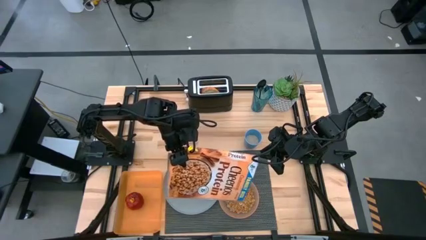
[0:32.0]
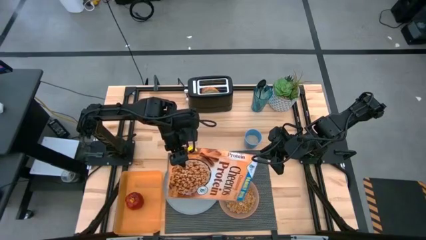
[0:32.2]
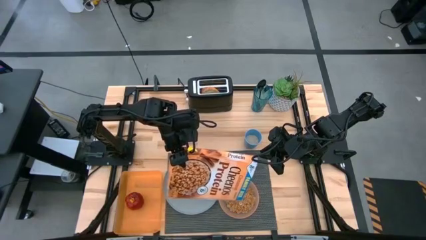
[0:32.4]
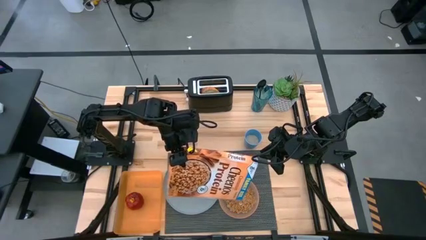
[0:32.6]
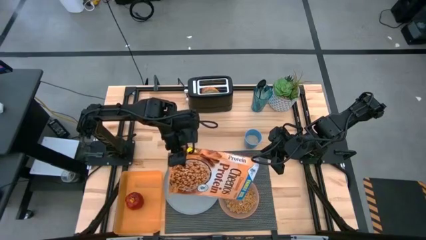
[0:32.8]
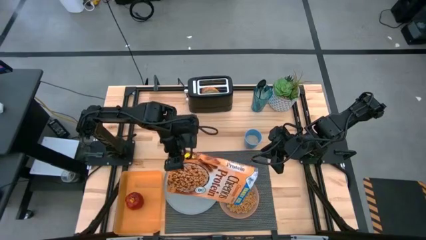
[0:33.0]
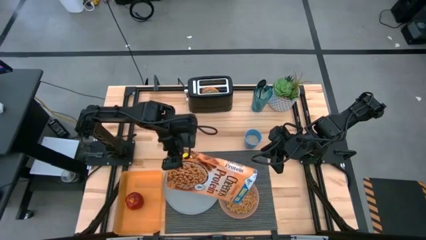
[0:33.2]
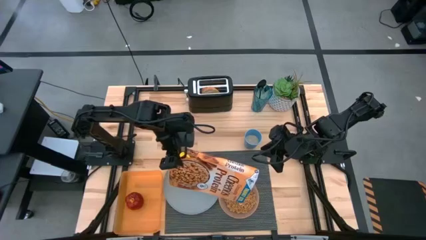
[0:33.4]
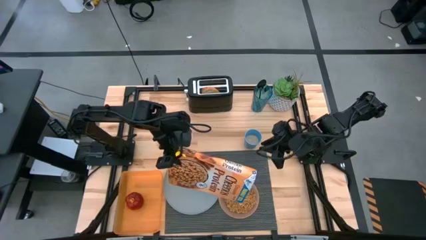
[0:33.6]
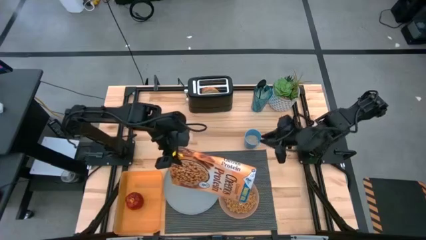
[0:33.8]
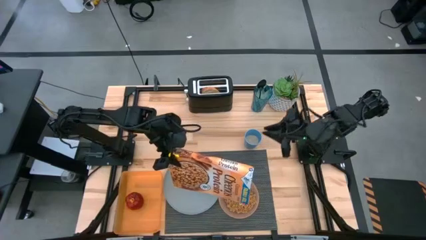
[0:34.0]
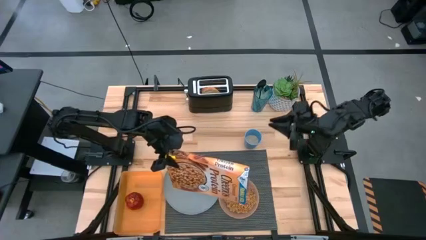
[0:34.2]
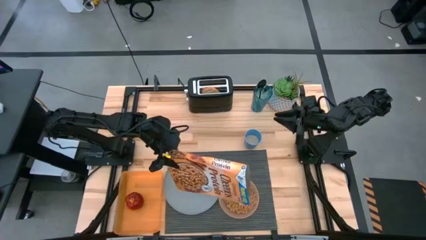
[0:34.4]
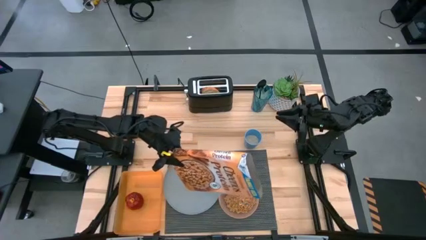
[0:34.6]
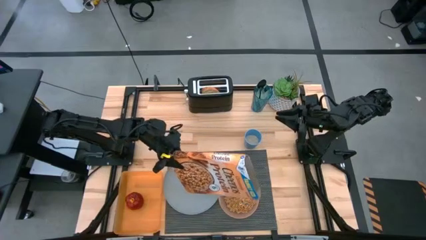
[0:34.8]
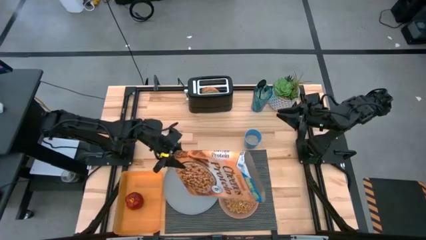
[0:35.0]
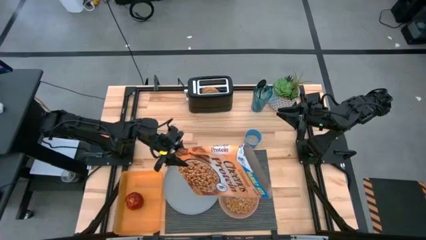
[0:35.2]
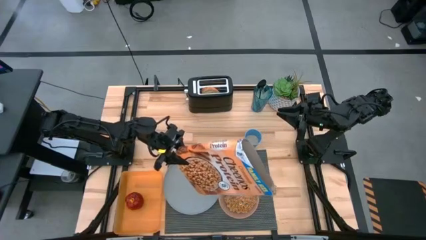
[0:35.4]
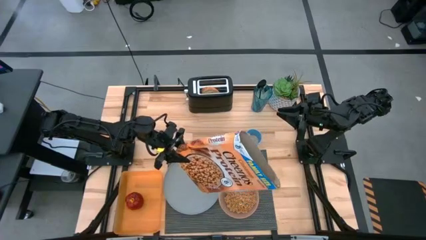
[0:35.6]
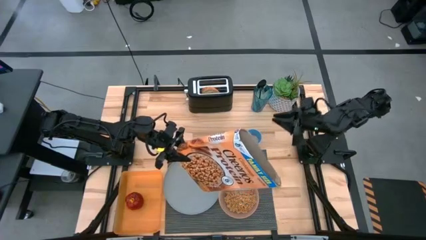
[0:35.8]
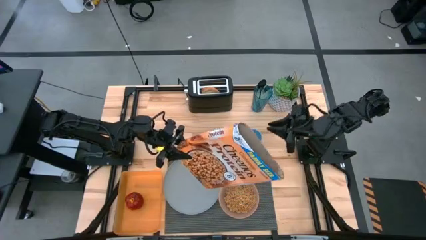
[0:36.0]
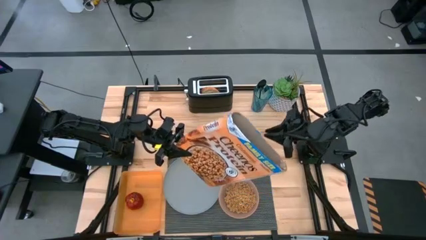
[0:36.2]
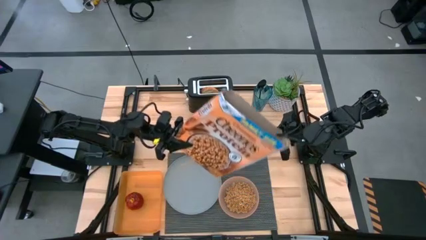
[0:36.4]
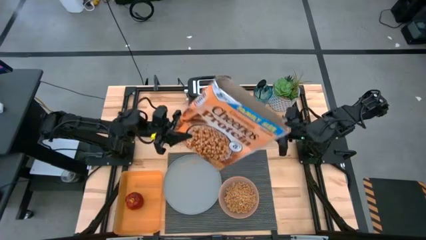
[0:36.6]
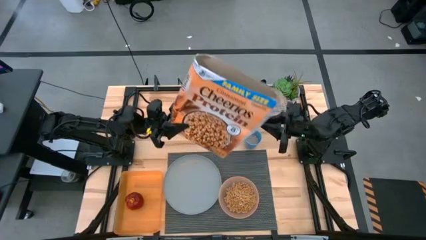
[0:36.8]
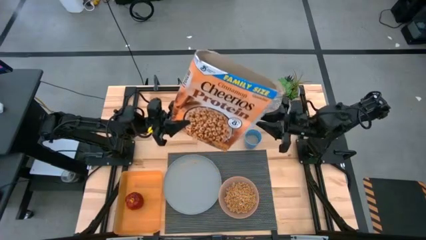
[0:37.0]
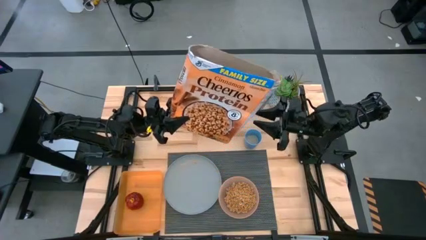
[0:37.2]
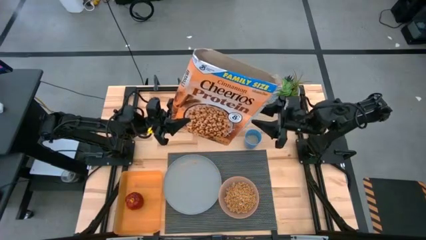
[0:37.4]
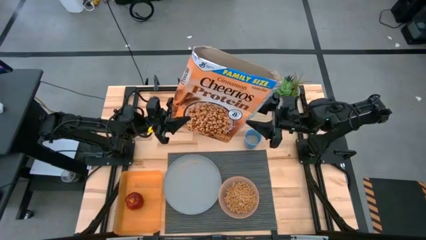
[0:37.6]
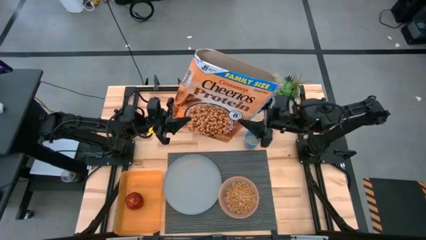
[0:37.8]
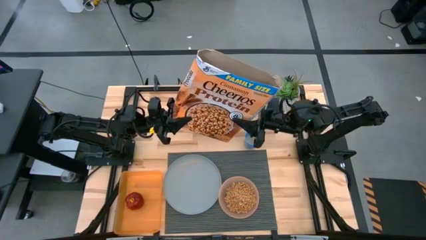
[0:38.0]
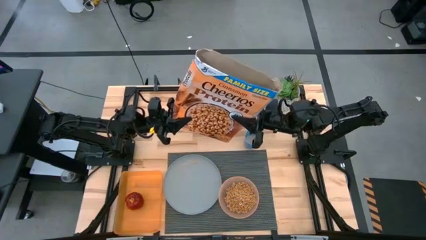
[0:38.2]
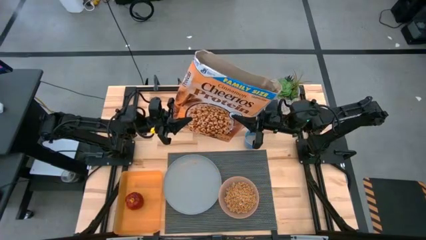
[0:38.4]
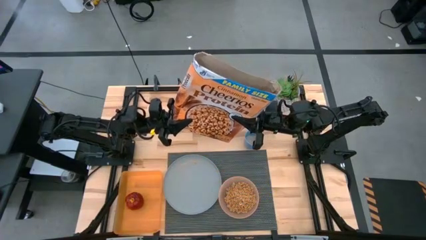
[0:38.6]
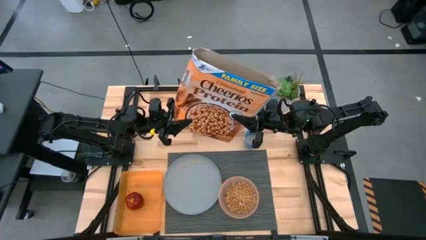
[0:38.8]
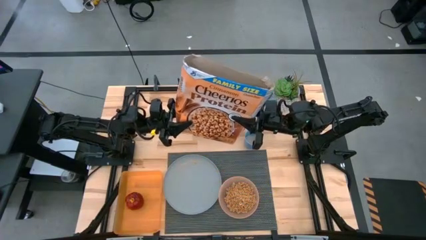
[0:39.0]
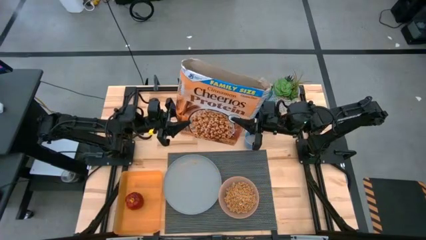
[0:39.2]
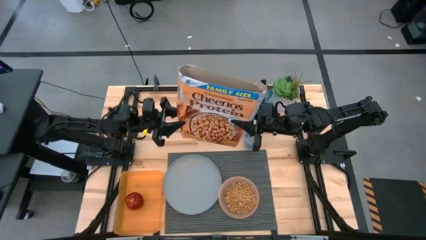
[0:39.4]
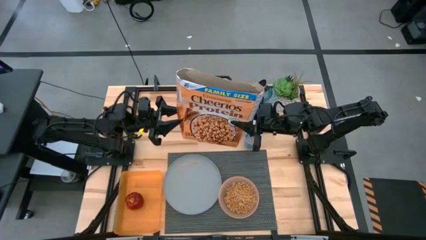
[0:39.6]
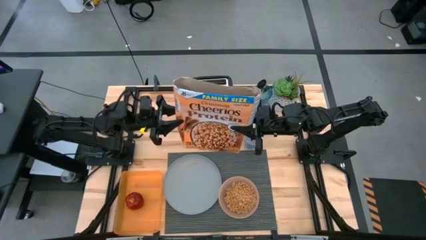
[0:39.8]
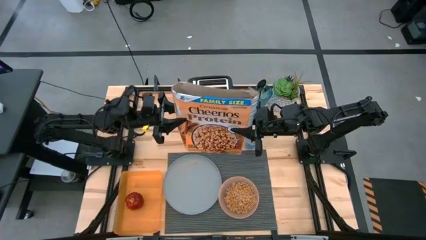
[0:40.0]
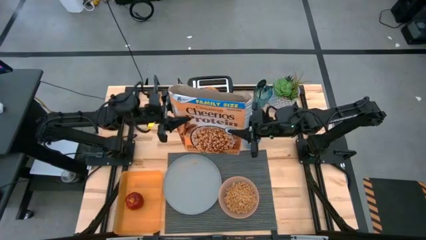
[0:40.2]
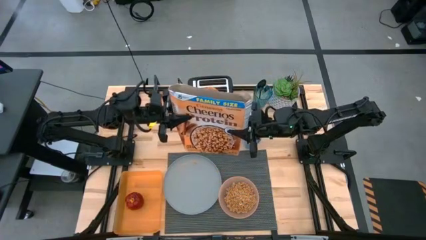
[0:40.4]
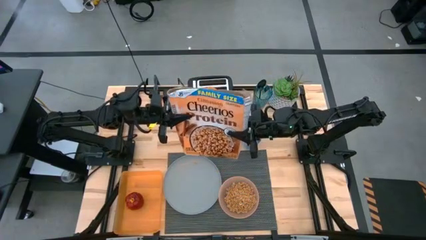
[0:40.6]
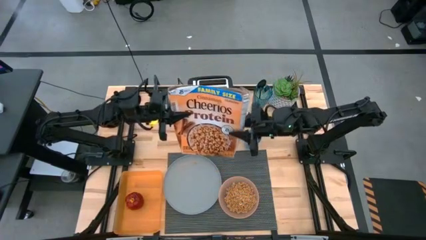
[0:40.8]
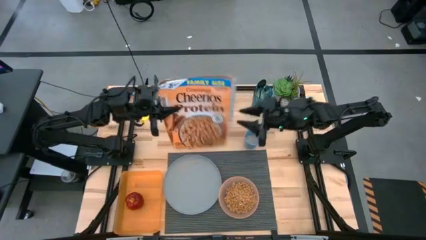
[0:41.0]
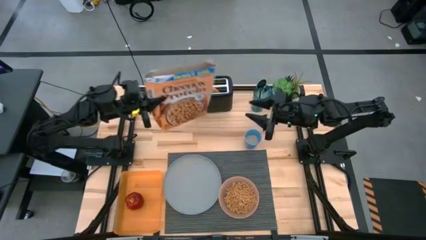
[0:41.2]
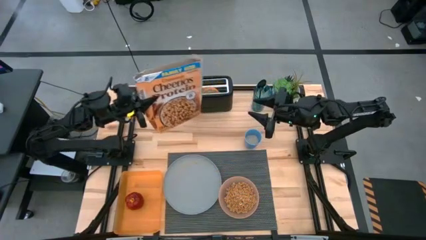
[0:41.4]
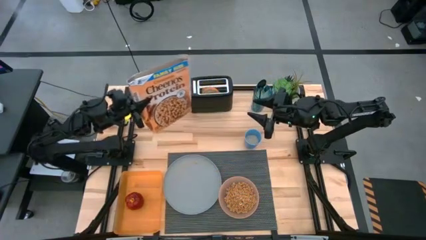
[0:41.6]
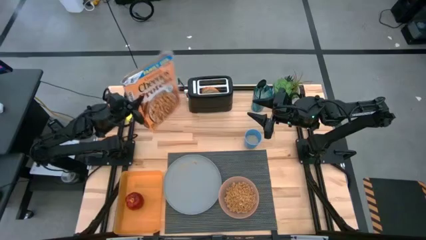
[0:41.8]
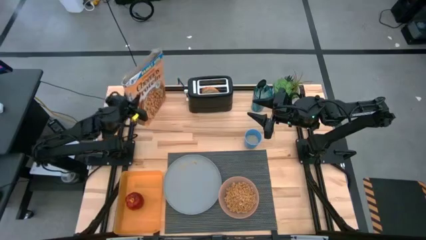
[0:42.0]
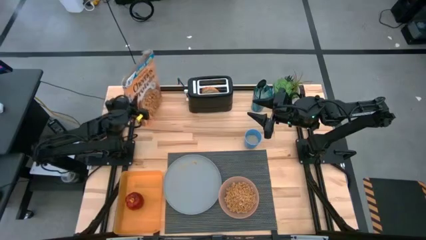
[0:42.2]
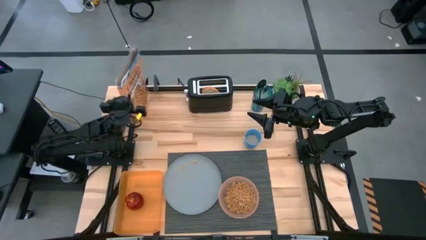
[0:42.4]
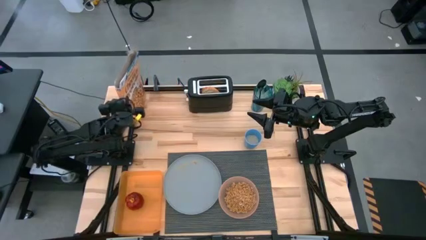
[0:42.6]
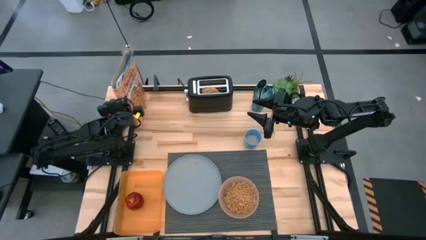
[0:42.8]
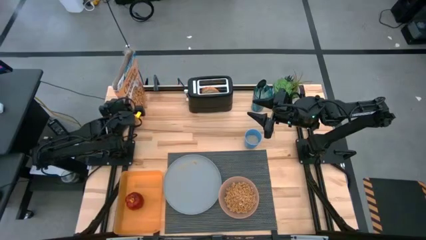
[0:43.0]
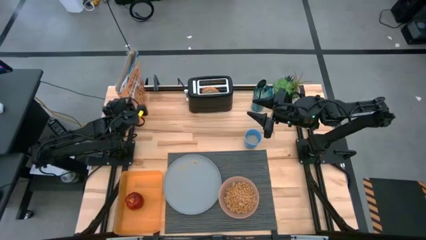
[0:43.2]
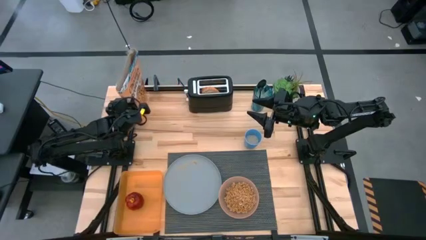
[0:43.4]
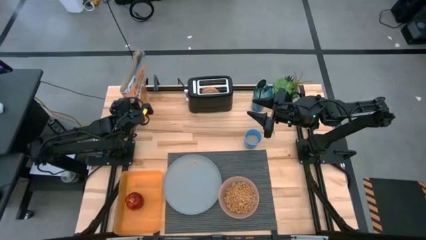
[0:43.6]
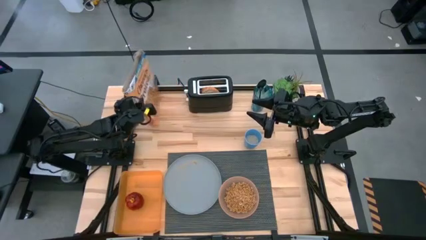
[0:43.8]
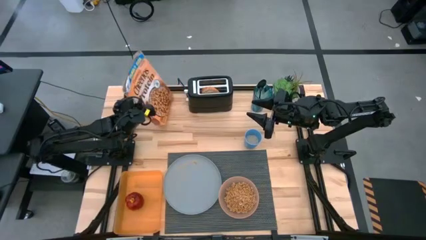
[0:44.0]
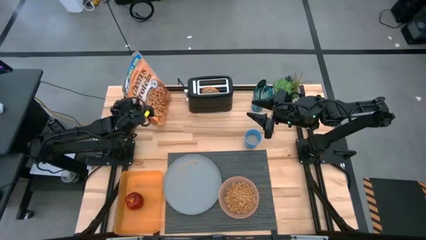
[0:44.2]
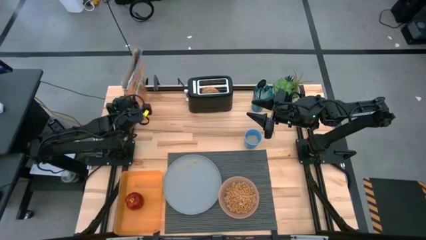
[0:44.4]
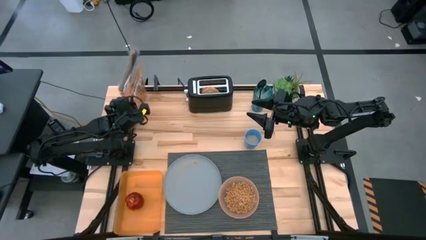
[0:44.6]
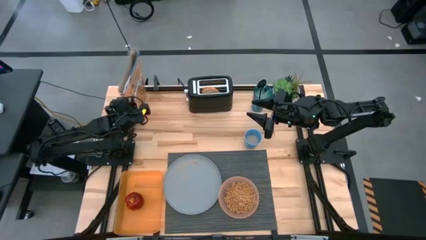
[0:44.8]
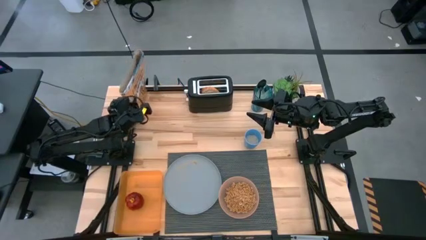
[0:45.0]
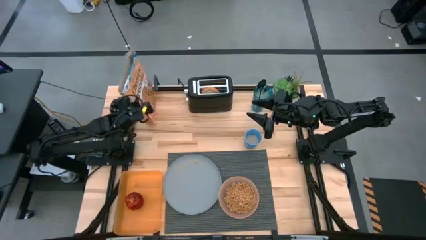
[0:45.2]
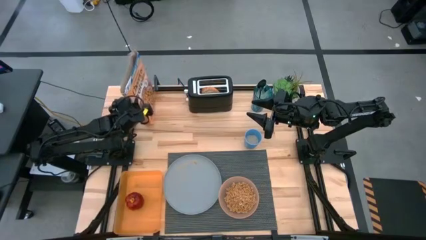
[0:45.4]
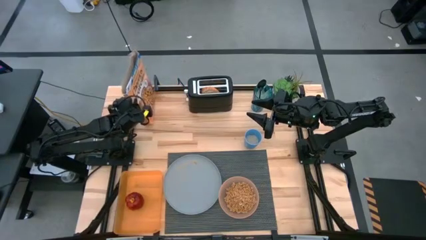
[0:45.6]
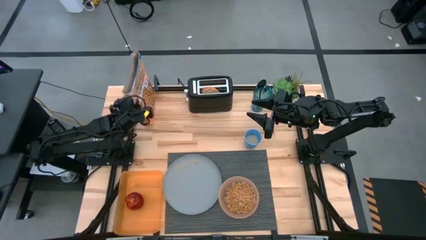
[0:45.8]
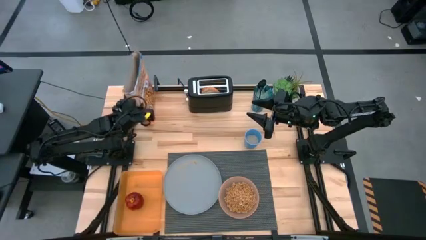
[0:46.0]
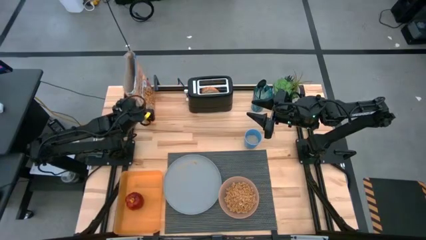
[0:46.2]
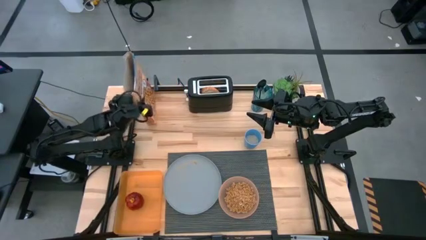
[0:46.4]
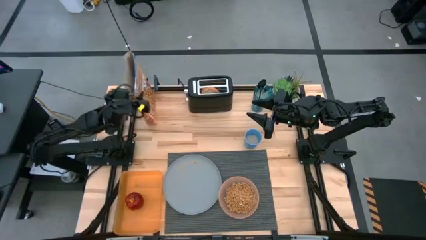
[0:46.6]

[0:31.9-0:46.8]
Task: Arrange a breakfast setting
Pour the cereal into the orange bowl

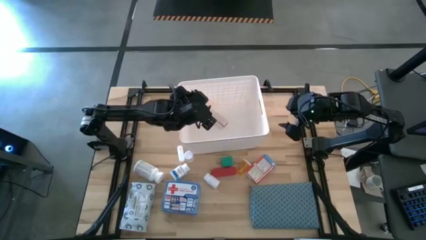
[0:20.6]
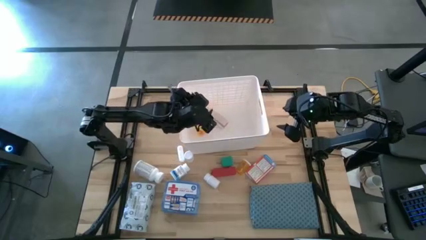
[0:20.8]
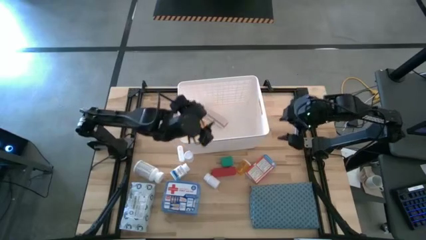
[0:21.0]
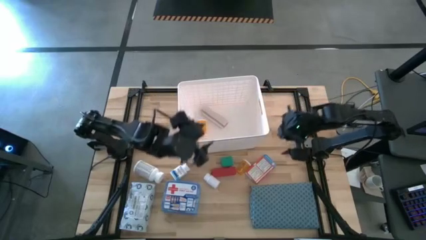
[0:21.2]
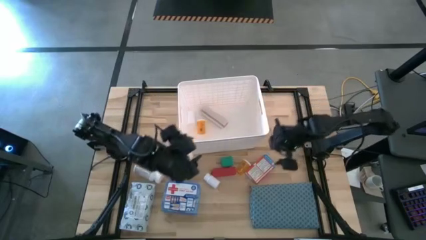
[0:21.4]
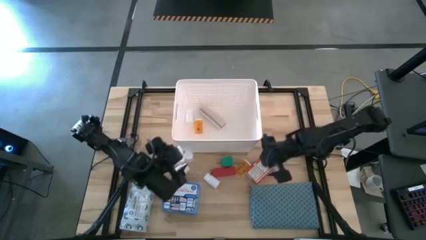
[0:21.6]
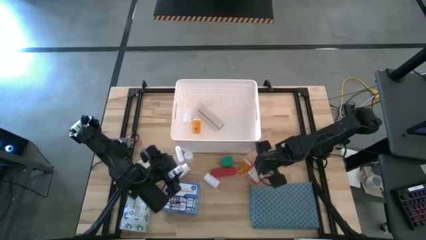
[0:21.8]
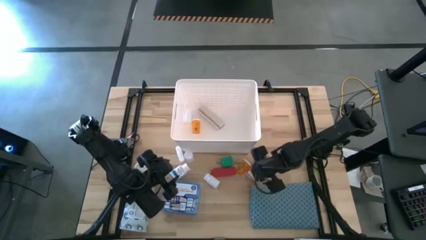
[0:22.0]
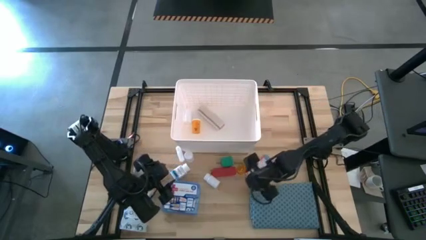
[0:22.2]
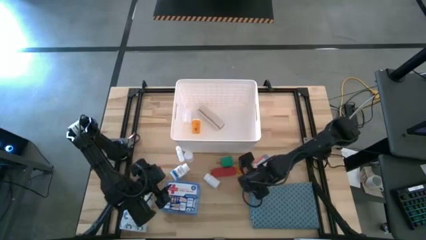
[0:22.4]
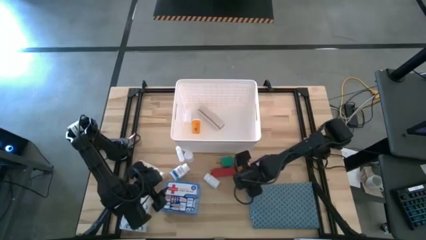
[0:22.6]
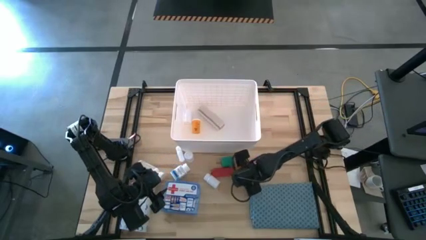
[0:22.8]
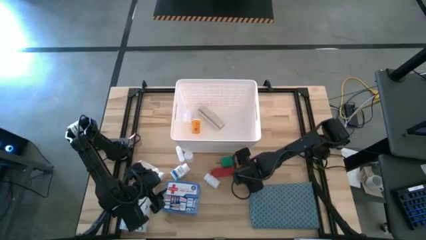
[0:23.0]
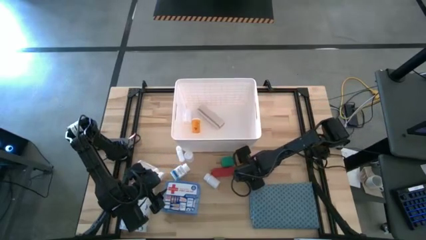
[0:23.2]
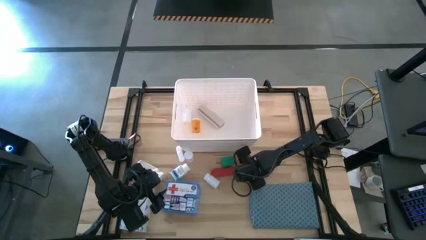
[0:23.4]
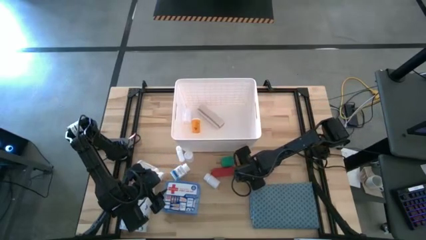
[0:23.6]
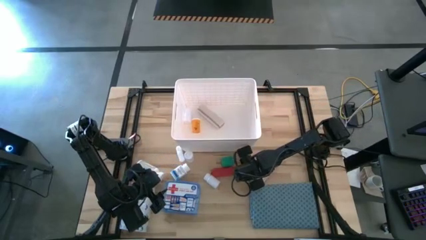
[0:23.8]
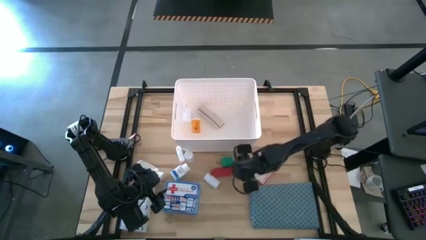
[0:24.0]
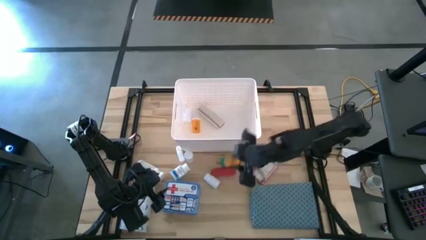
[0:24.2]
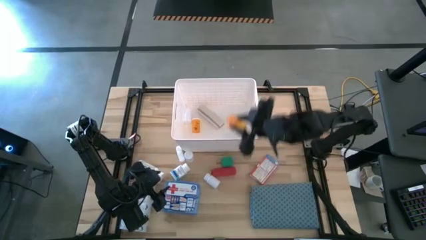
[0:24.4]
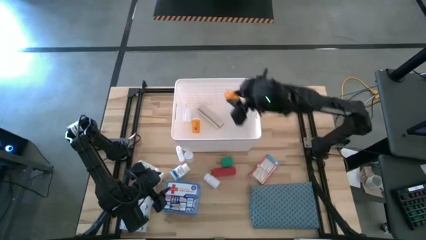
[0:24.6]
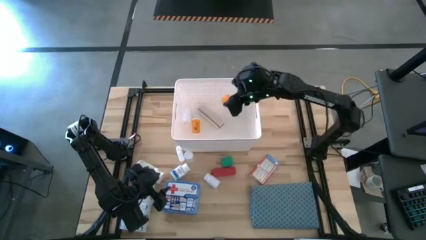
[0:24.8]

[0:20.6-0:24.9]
Task: Pick & place medical supplies in basket/bin
Put the orange pill bottle into the white bin
